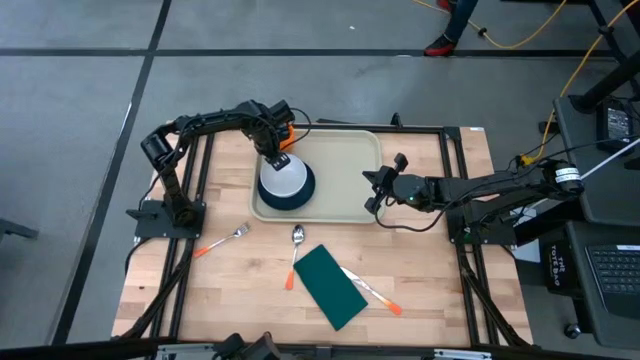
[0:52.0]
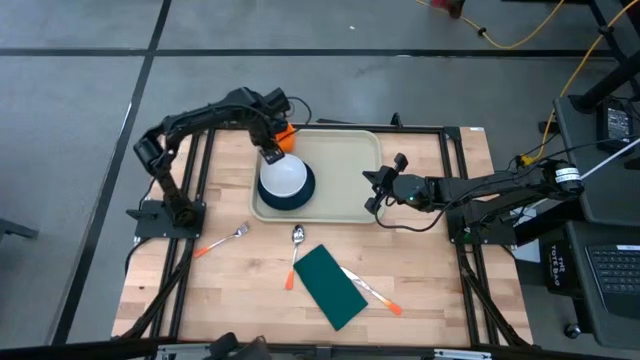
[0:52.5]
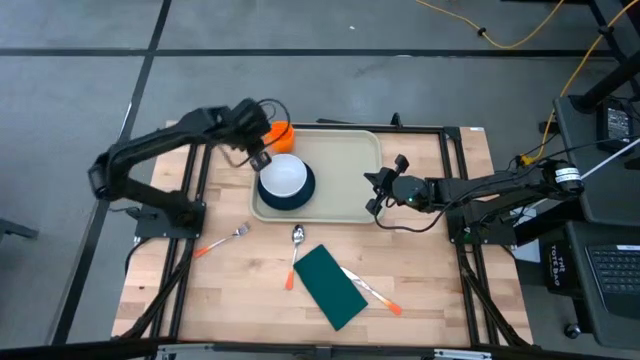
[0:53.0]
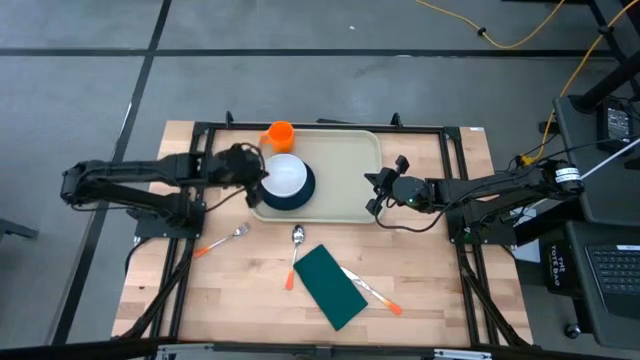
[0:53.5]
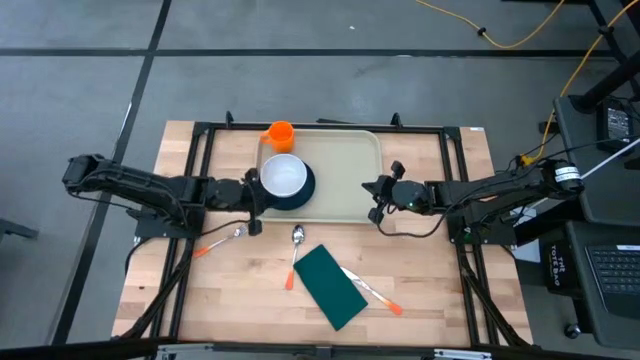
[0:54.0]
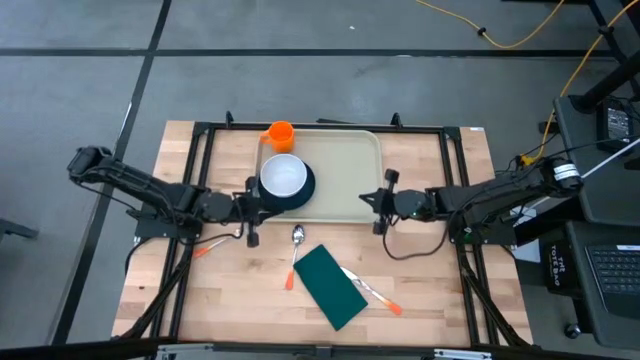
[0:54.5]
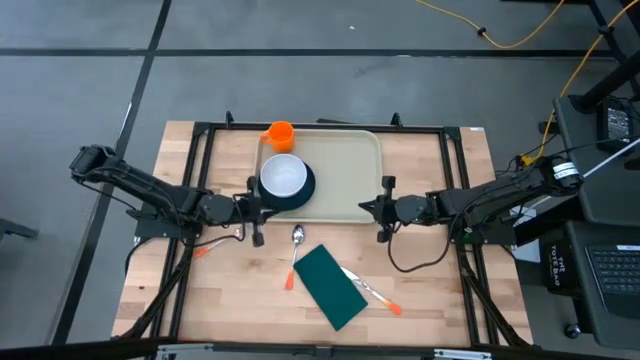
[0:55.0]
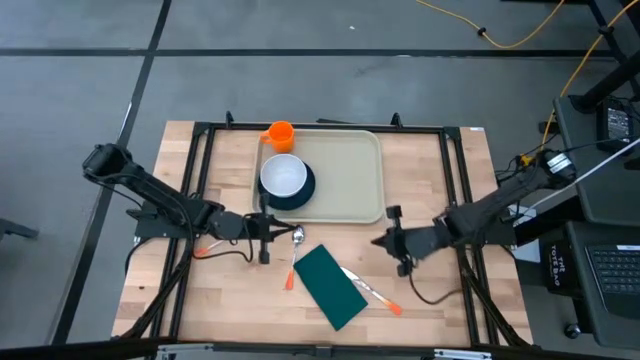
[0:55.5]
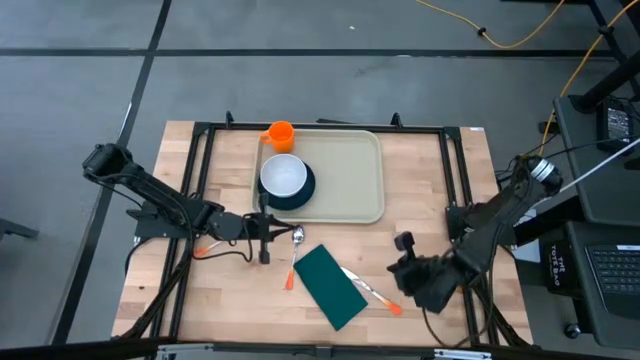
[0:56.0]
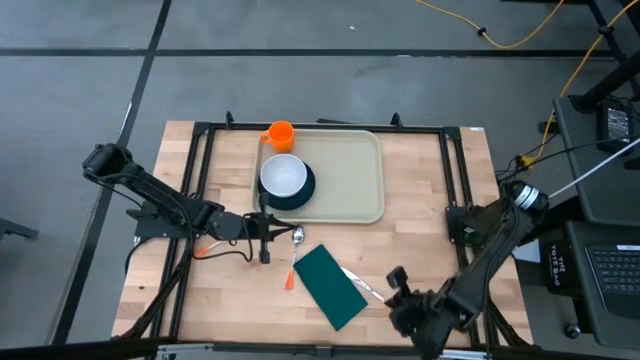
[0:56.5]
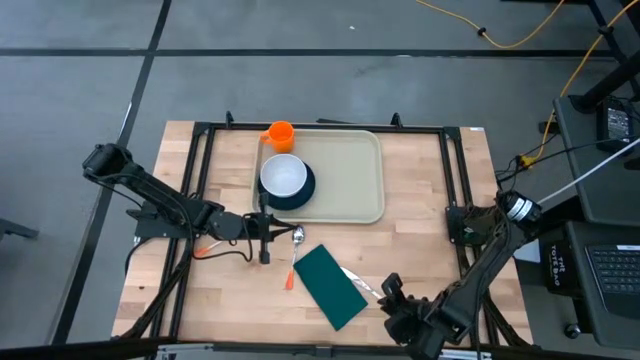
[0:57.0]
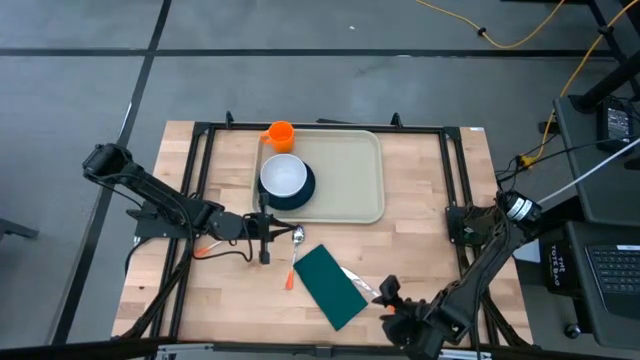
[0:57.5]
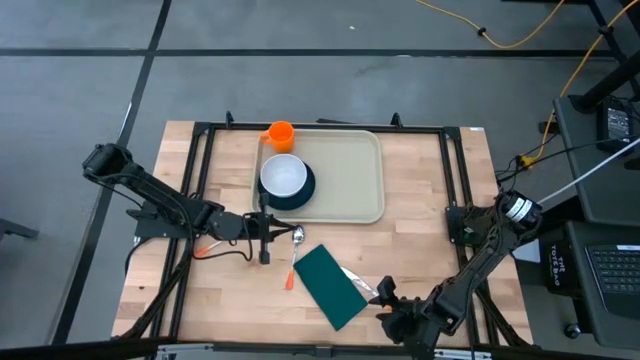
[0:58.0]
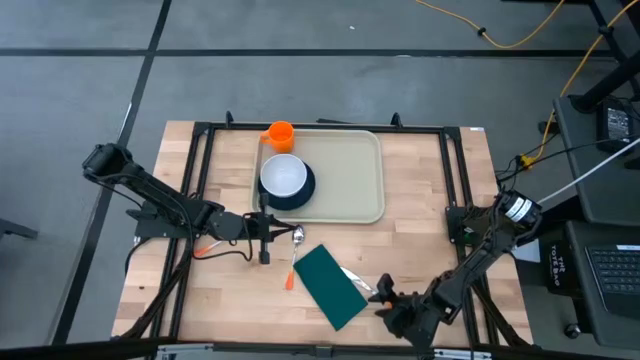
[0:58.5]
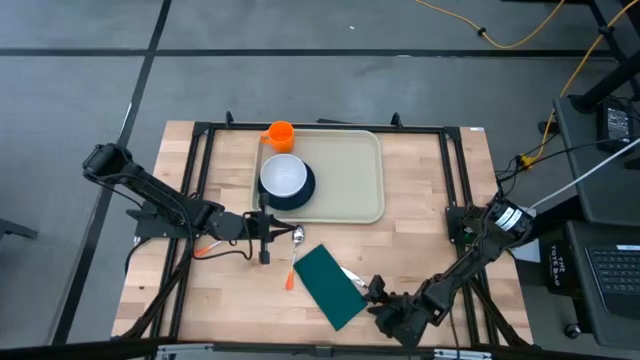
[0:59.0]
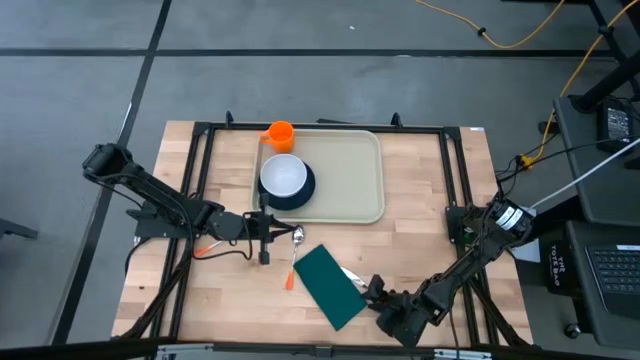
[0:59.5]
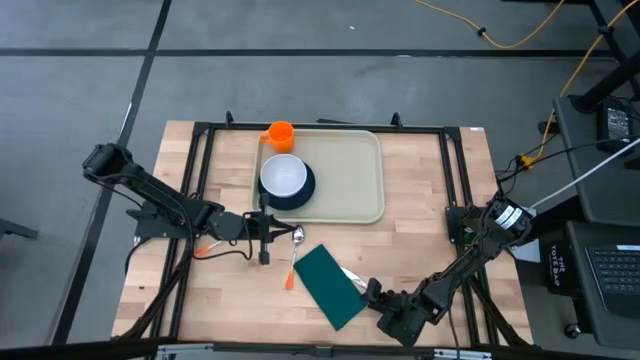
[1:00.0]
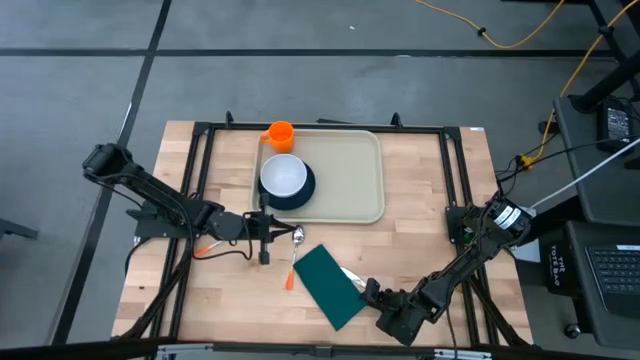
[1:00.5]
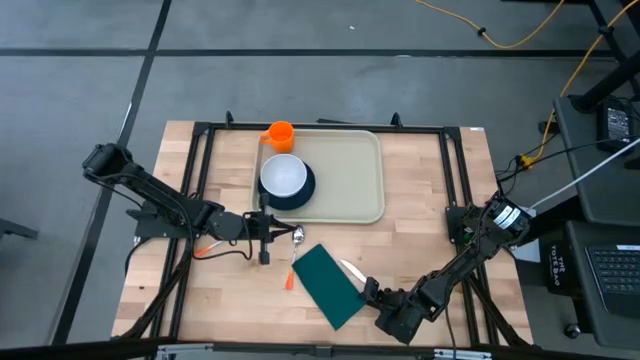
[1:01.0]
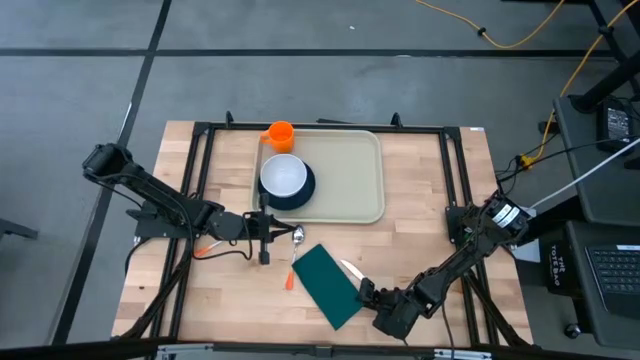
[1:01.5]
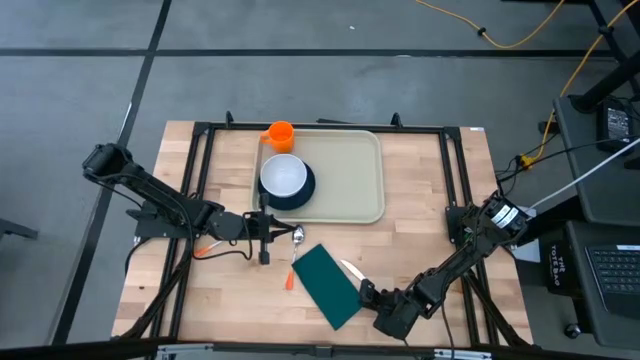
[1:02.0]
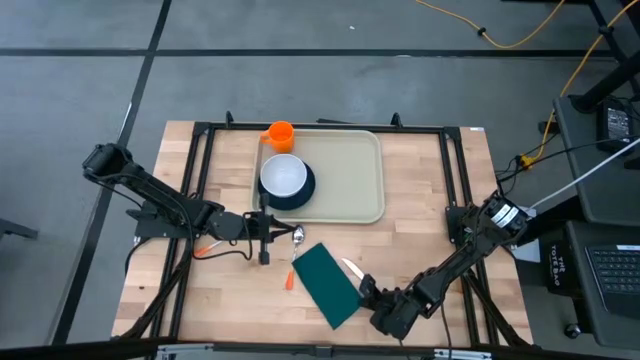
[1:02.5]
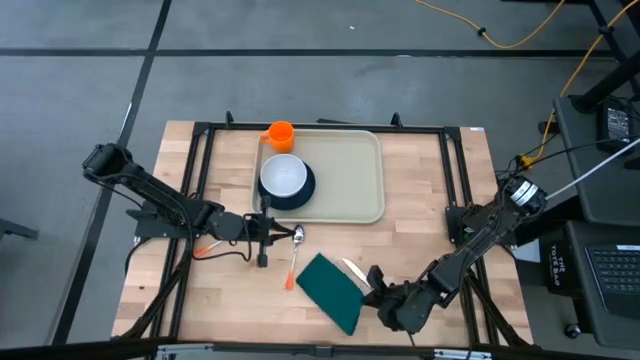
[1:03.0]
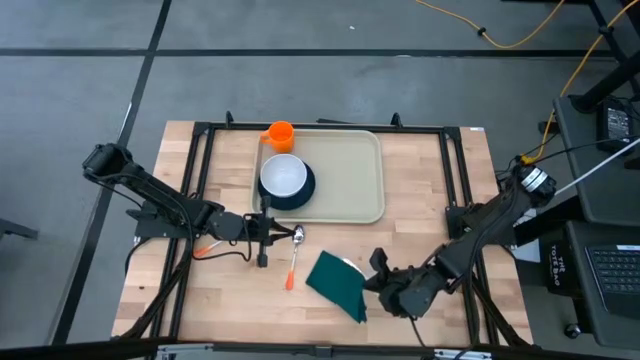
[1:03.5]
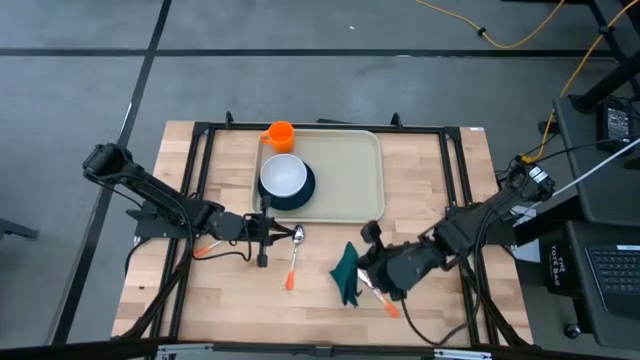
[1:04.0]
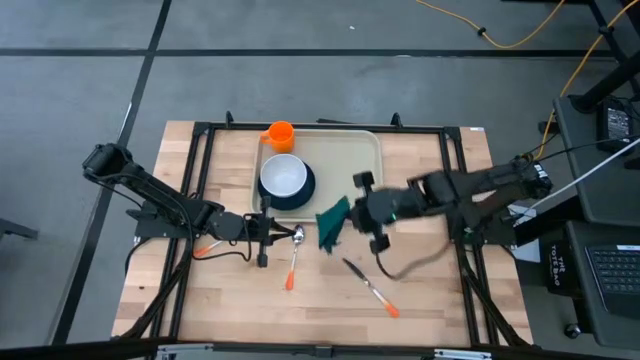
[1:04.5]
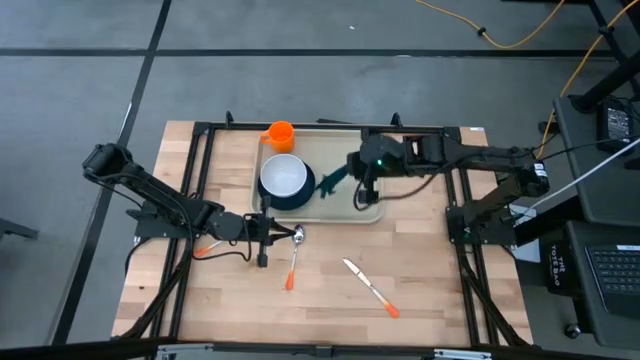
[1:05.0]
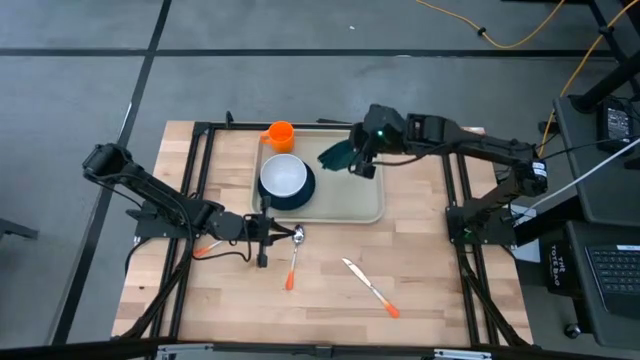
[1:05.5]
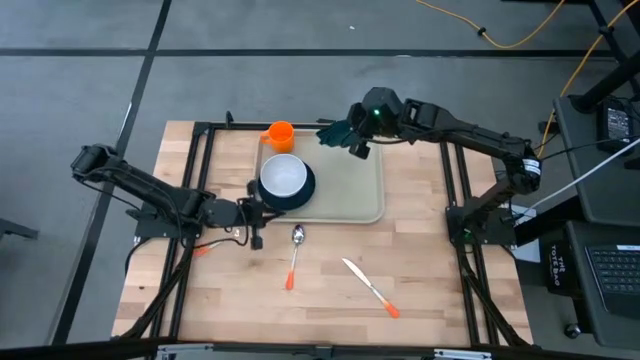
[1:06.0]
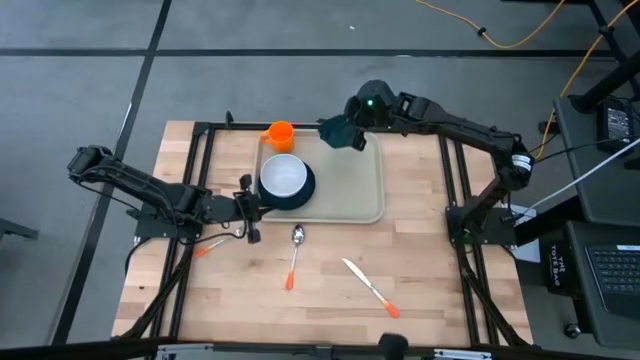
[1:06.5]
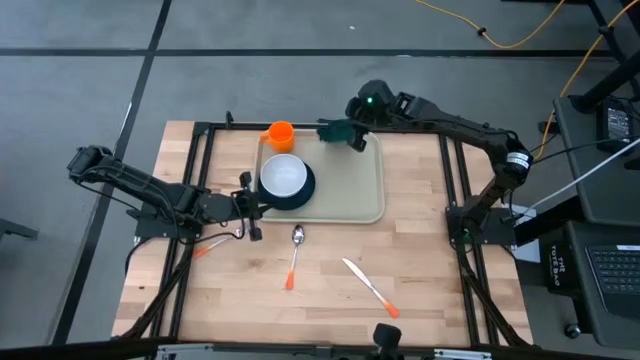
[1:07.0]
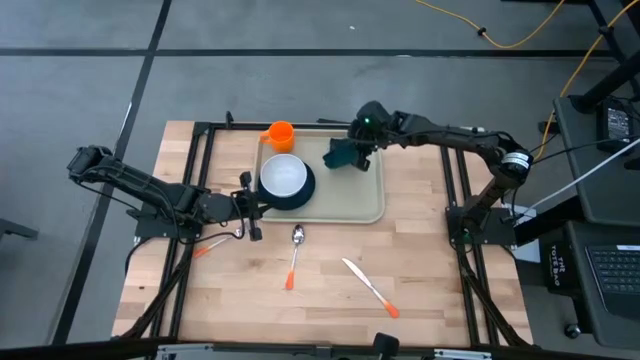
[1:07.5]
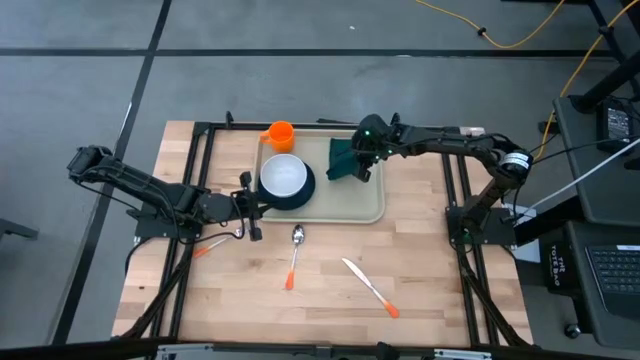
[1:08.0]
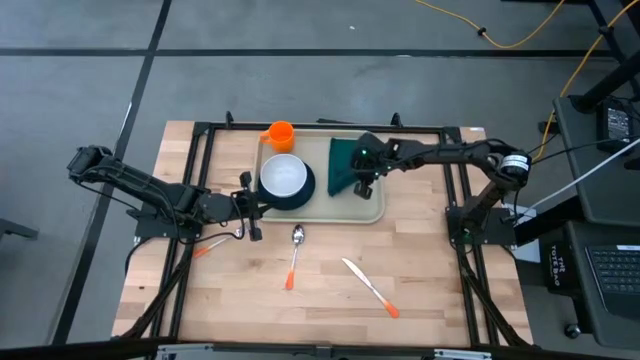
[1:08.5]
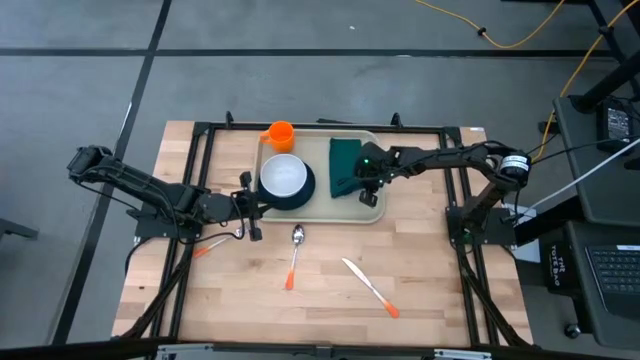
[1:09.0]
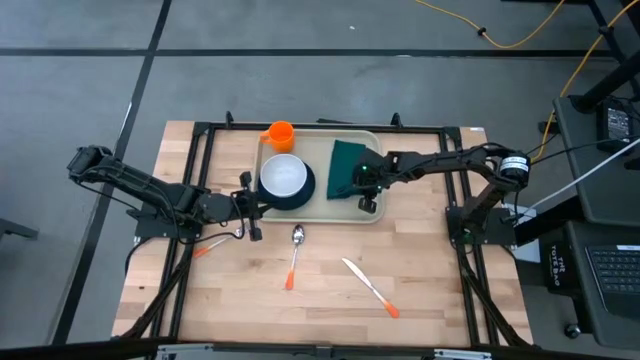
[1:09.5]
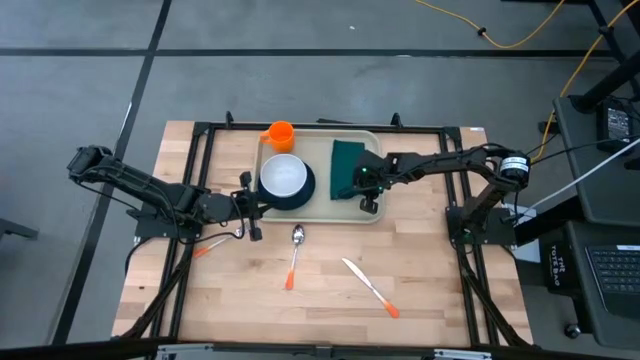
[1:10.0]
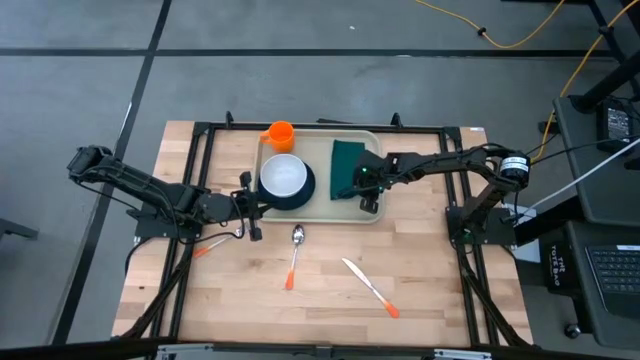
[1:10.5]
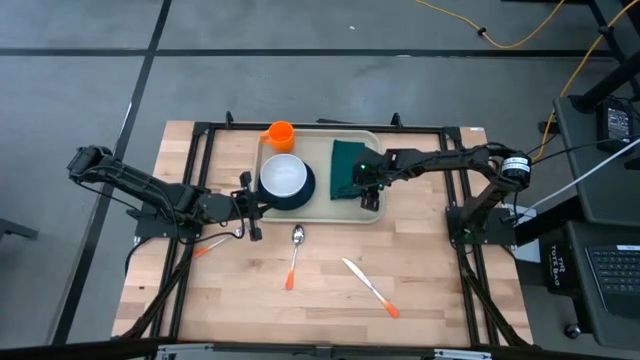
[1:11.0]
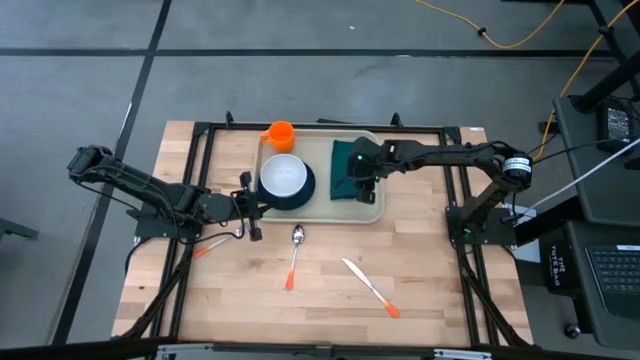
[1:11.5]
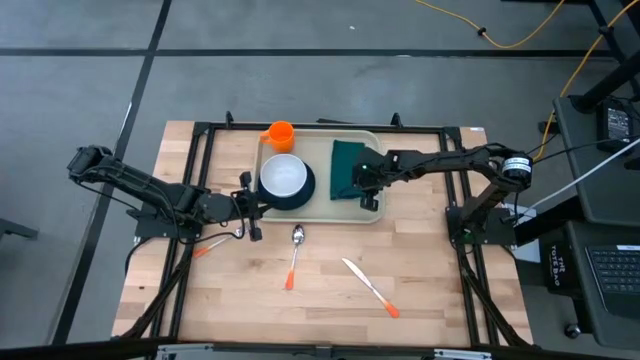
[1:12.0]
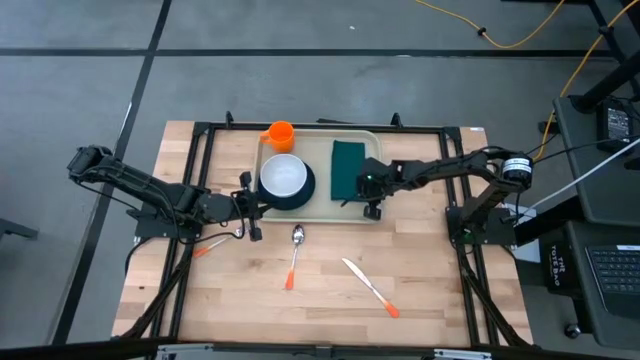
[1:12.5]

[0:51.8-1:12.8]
Task: Set up tray
Put the green table napkin on the brown serving tray to the right of the green plate
